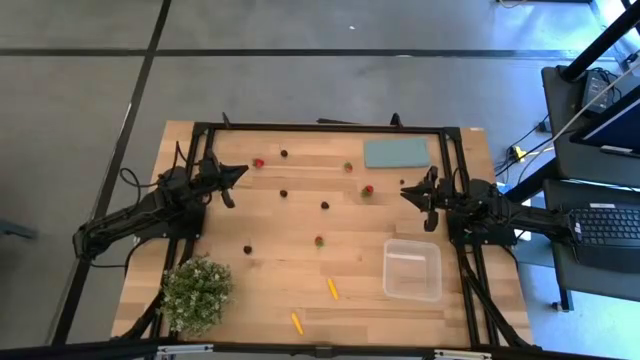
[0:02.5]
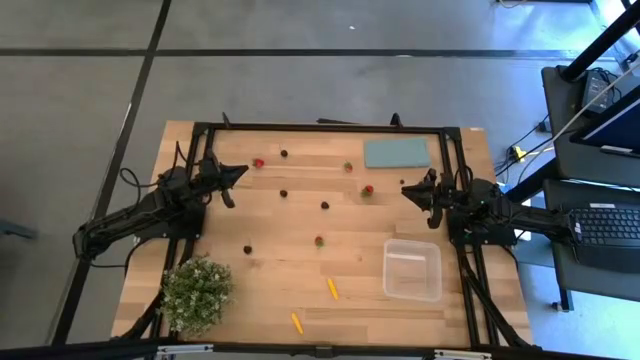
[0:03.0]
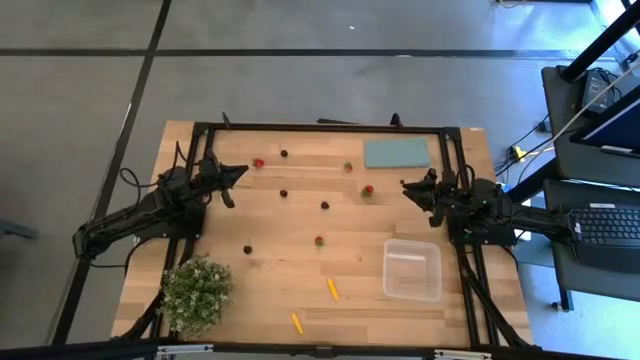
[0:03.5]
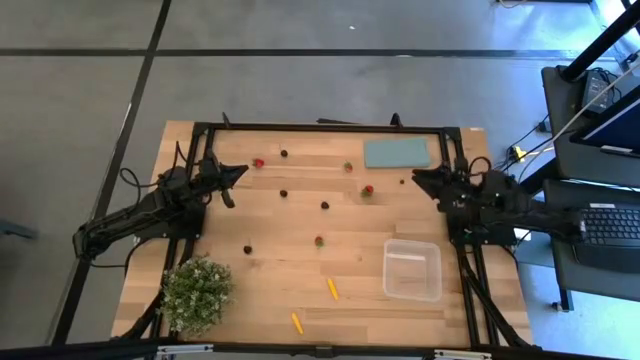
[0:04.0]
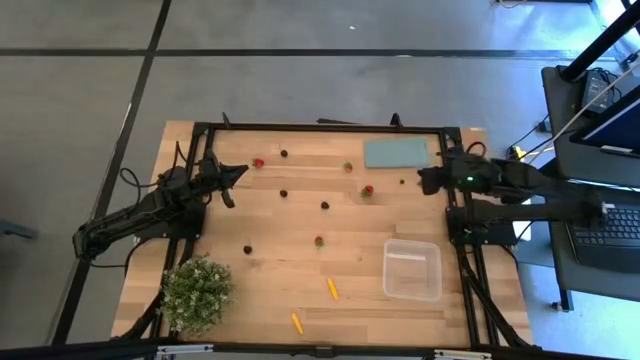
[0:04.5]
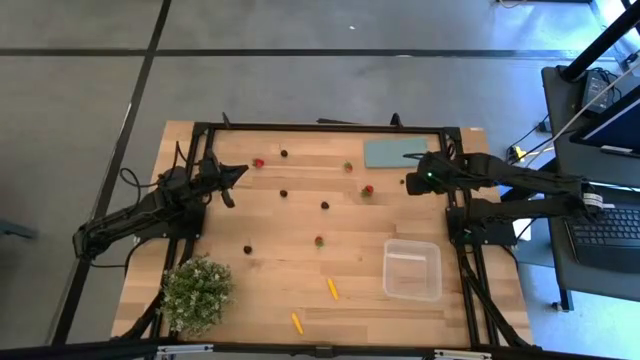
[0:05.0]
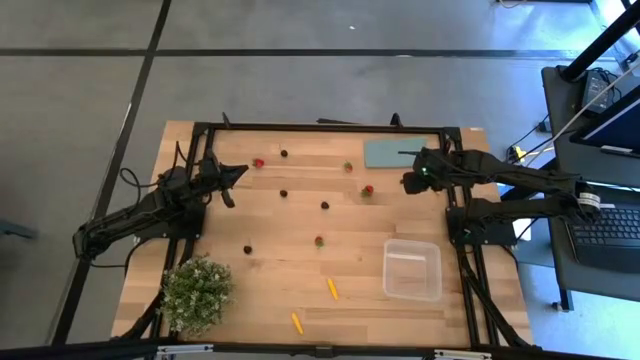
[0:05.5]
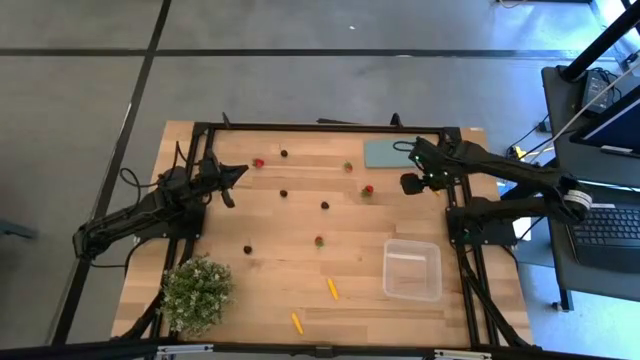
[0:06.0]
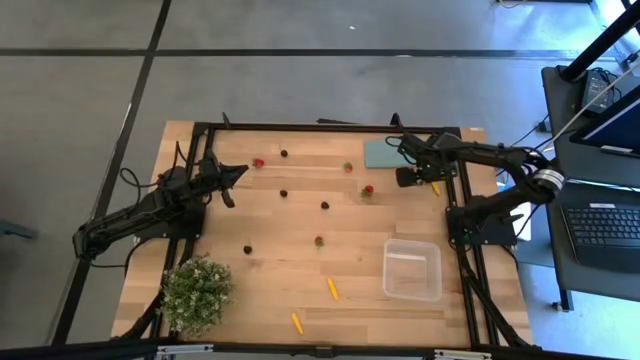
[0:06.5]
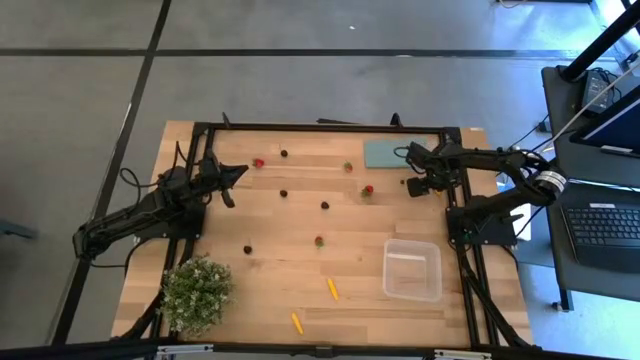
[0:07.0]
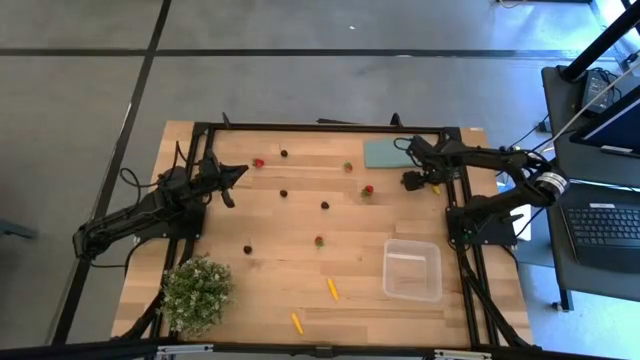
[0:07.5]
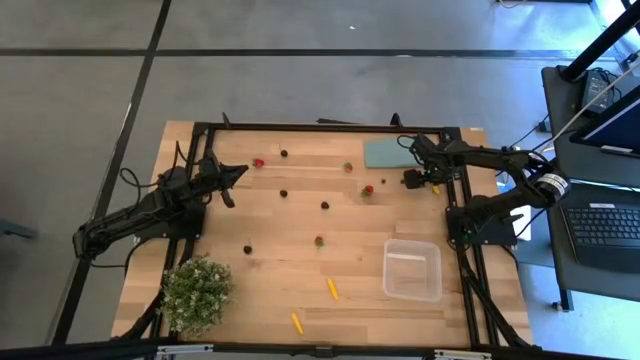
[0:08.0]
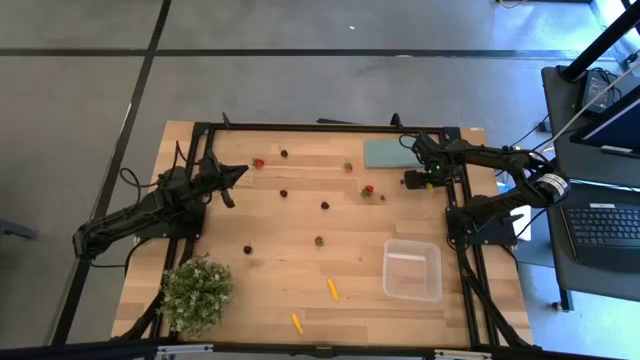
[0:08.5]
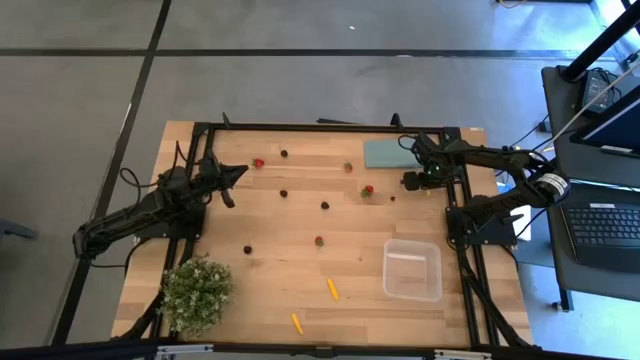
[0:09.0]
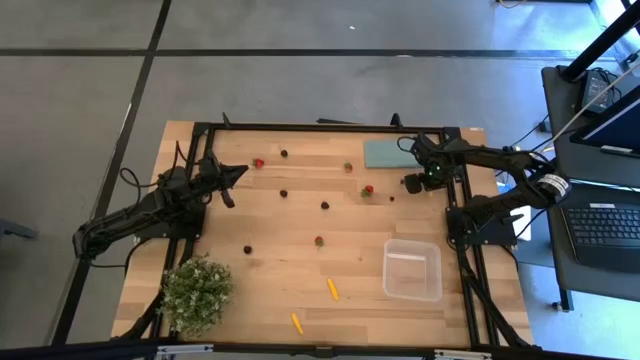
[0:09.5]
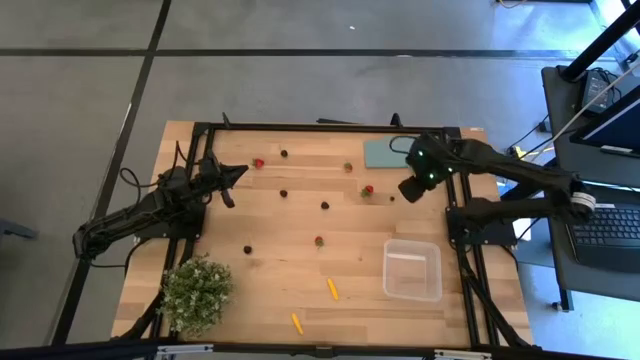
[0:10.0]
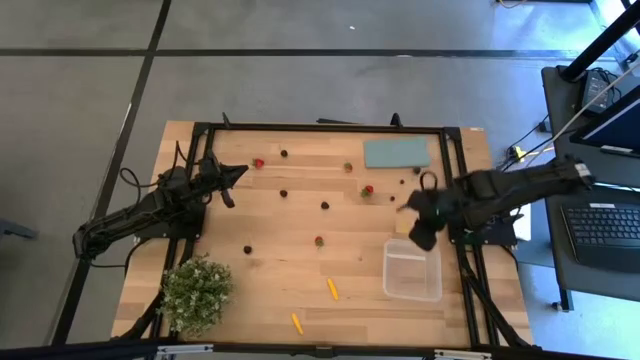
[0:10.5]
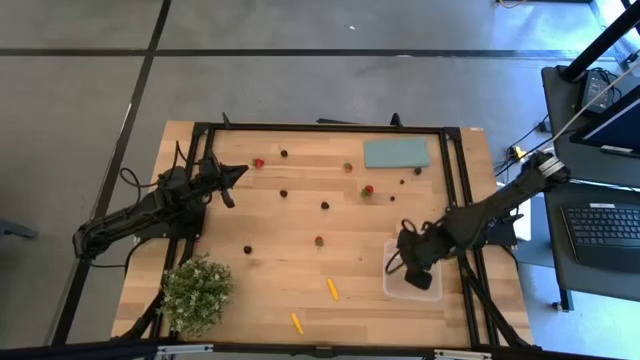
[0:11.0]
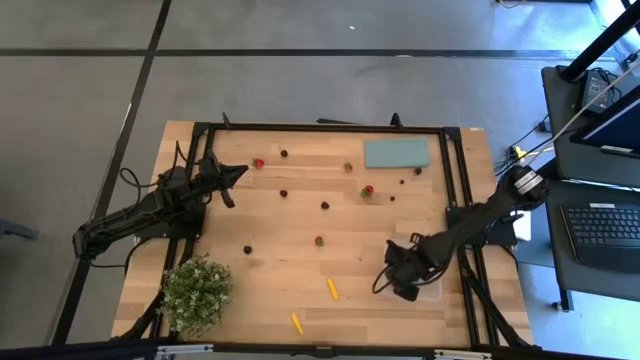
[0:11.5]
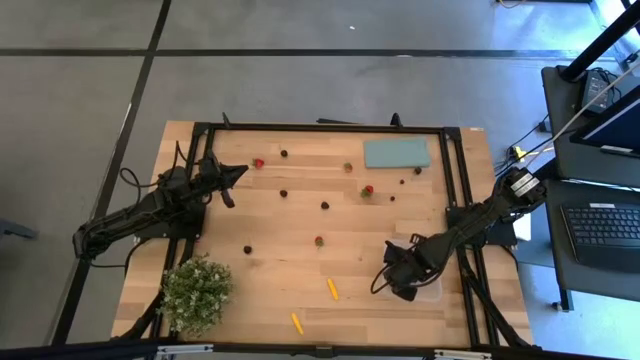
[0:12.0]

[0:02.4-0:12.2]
Task: Pick and placing Produce into tupperware
Put the top corn into the container

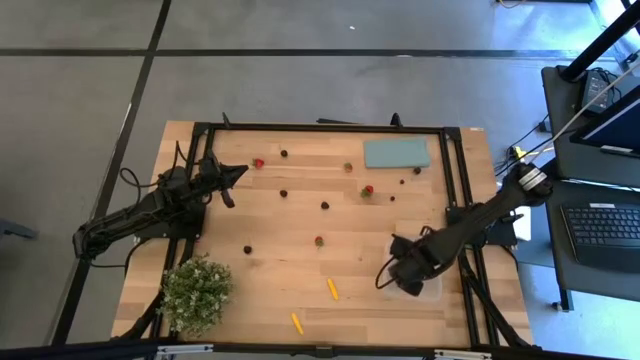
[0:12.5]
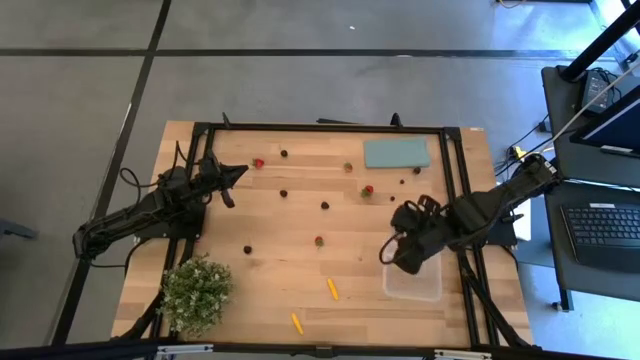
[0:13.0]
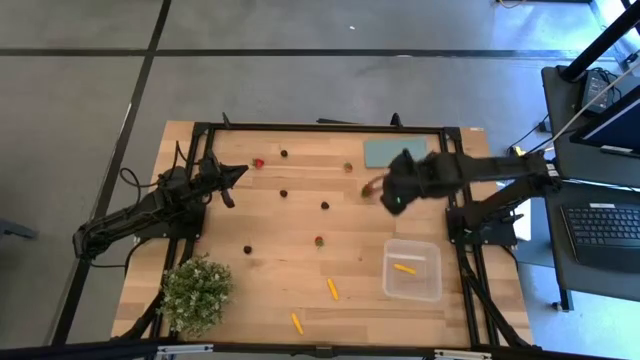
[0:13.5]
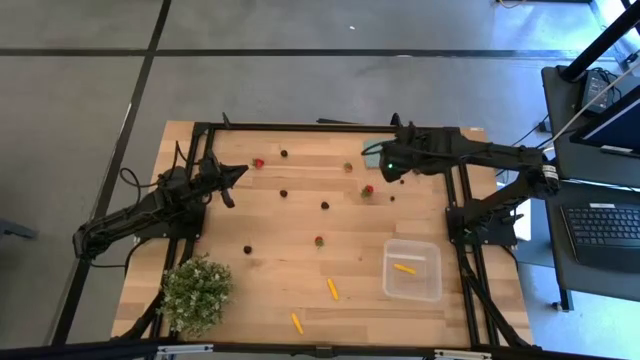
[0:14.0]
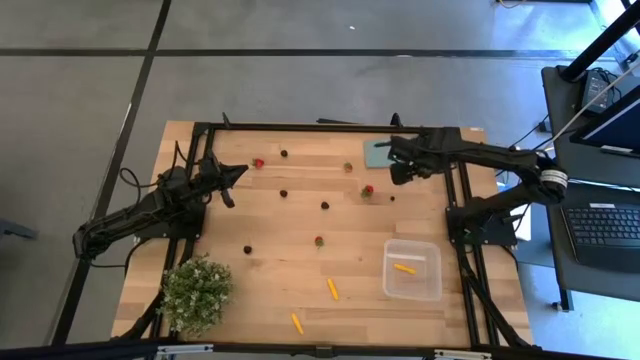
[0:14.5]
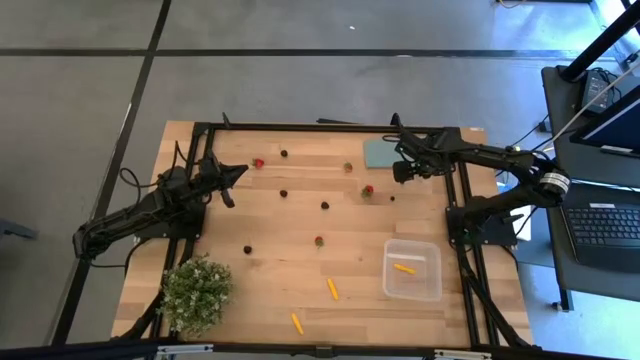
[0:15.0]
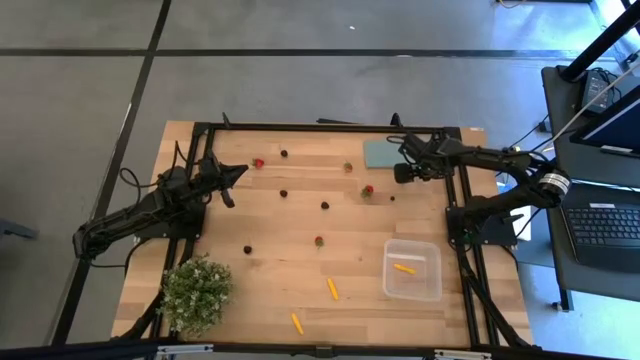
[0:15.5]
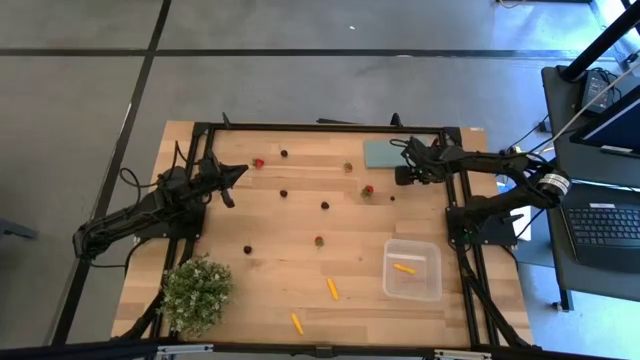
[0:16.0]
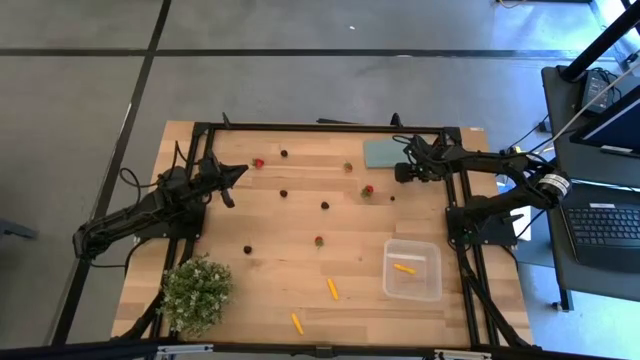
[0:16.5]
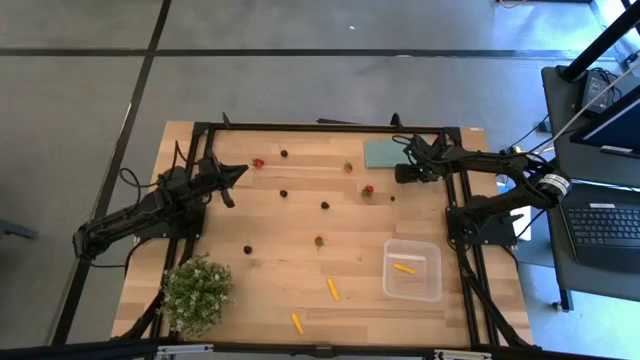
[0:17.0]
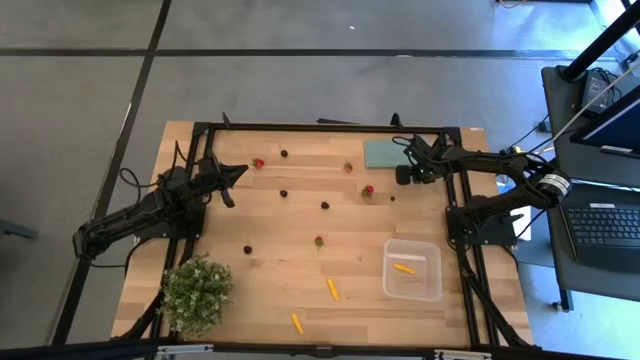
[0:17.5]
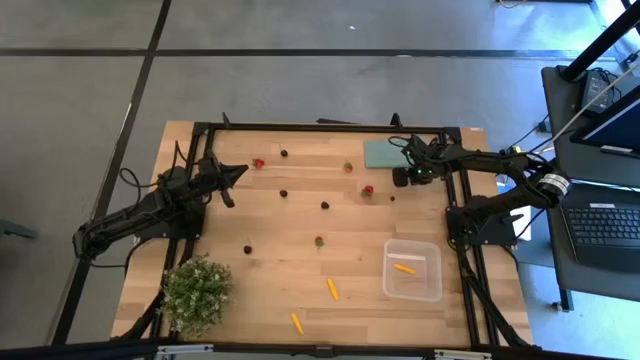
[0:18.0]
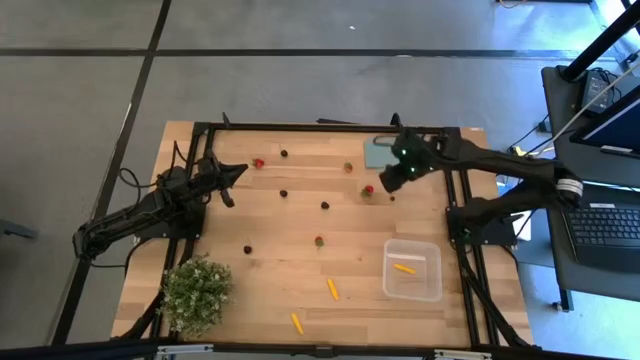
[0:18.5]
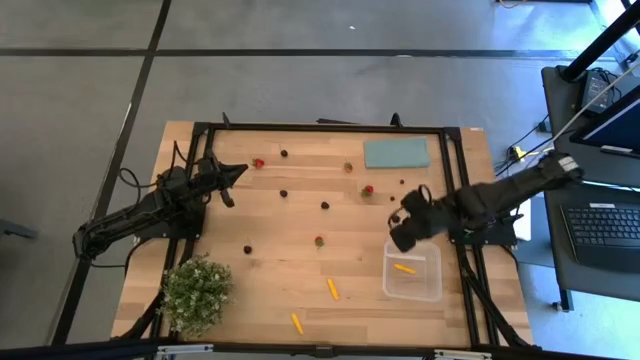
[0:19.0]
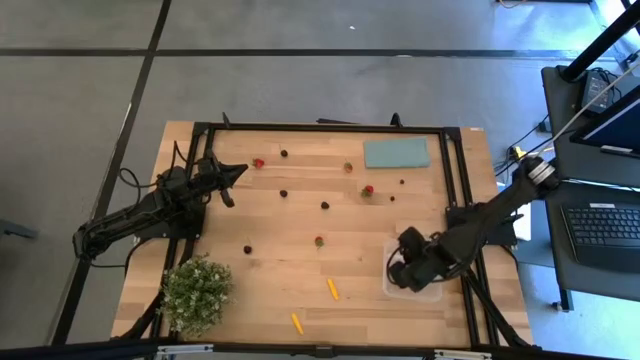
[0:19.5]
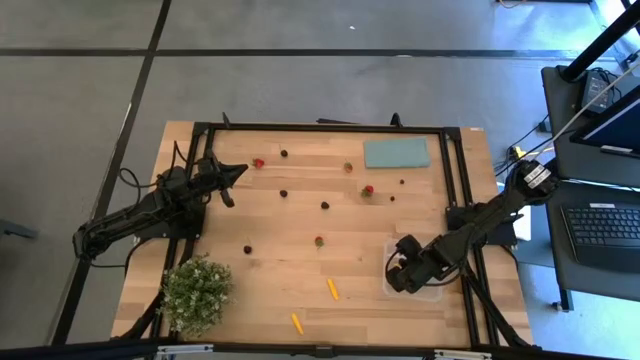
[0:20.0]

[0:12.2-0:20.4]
Put the top right black cherry into the container

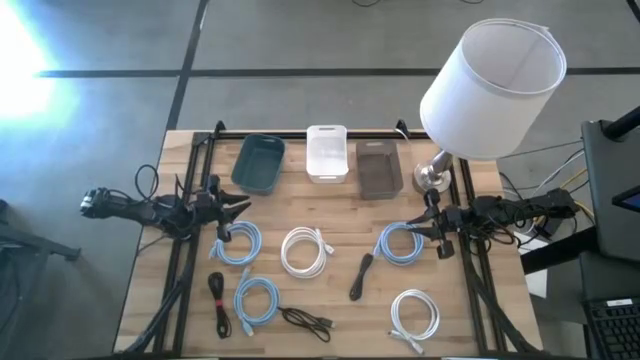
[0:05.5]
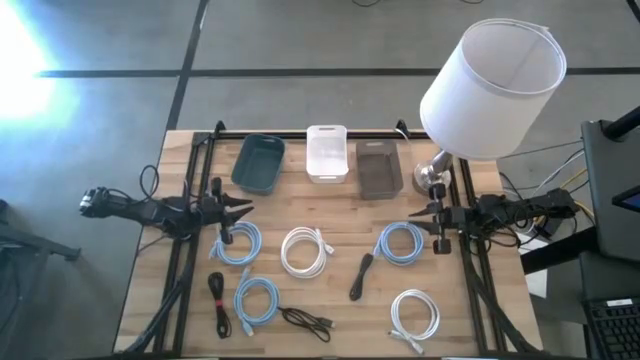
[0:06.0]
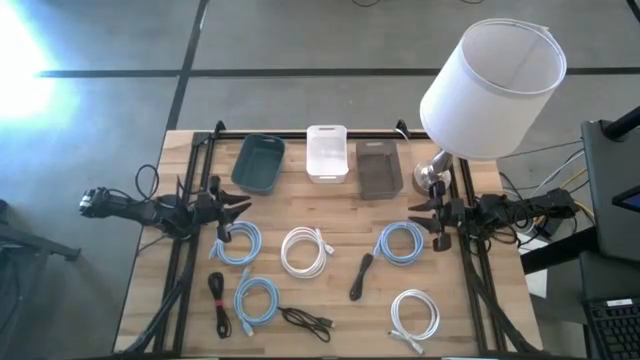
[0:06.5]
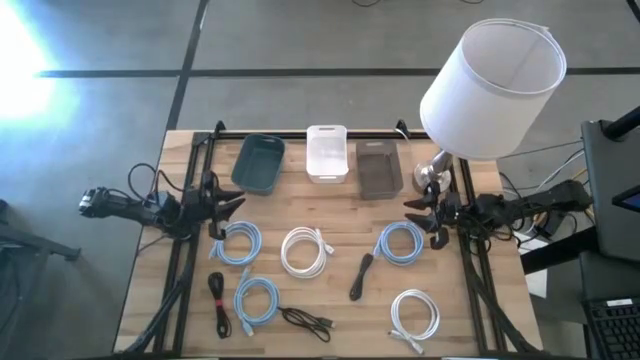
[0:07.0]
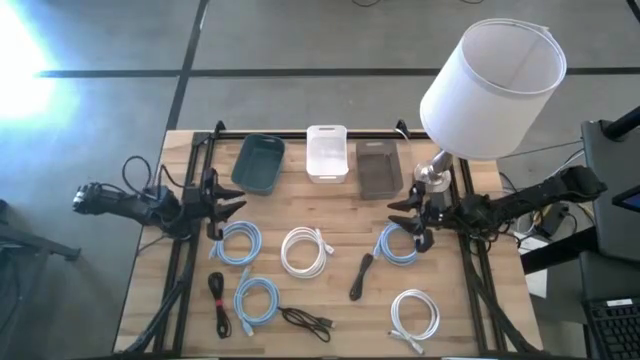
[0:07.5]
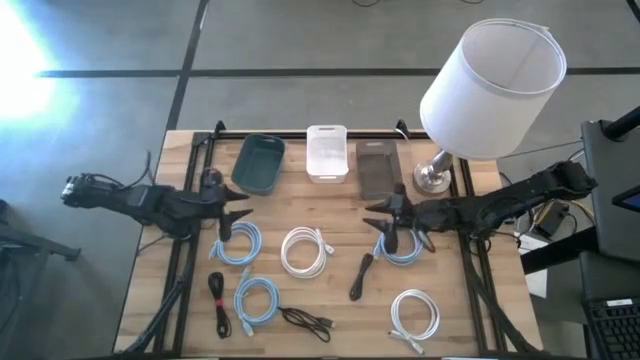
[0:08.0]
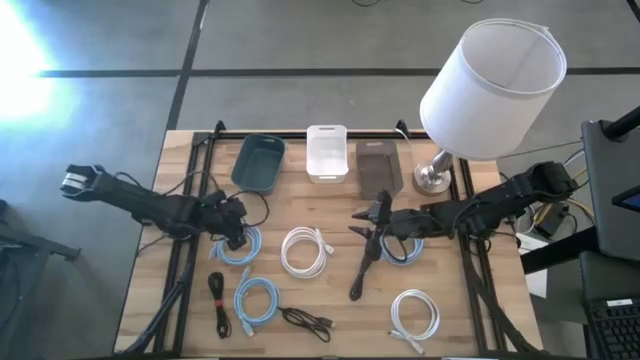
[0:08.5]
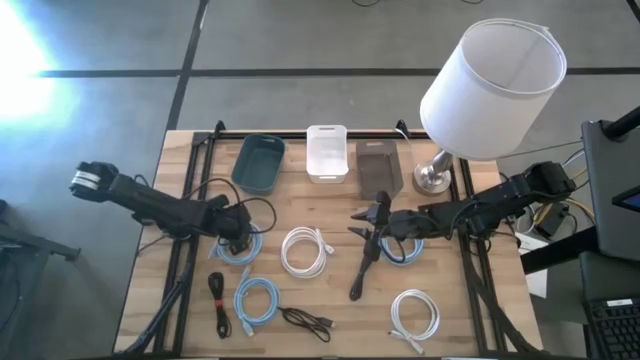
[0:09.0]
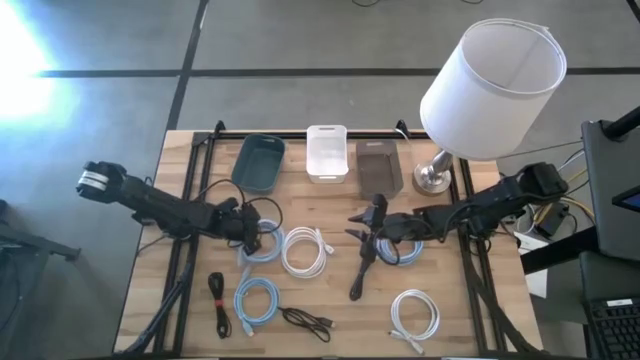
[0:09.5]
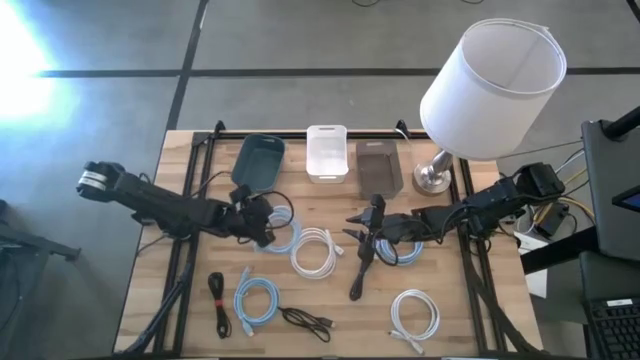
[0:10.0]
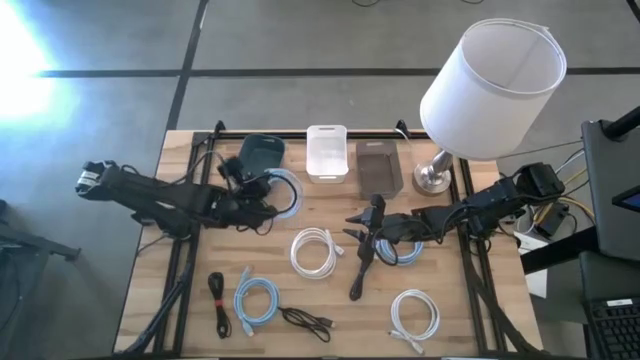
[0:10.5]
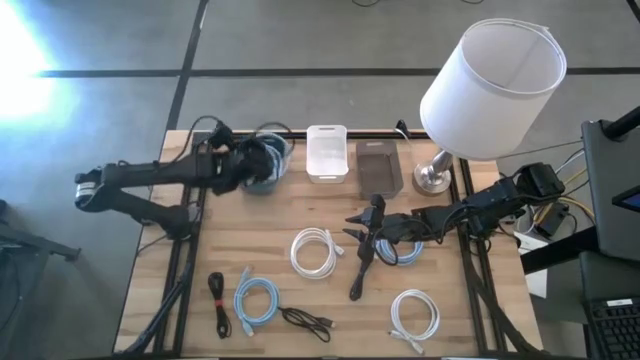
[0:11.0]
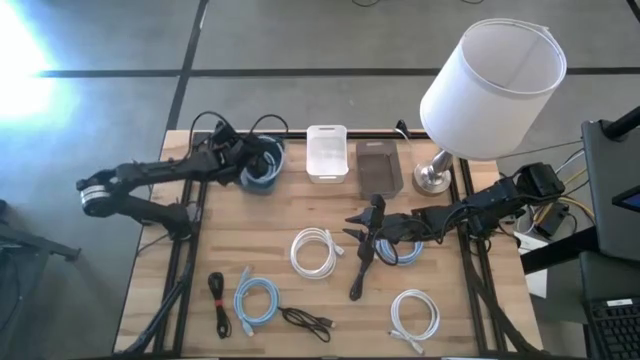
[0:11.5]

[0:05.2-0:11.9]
Task: Pick & Place USB Port
Put the top left blue HDMI cable into the blue bin
